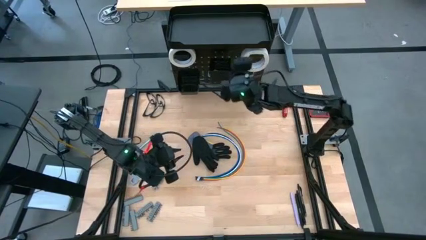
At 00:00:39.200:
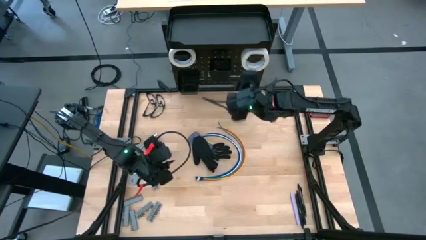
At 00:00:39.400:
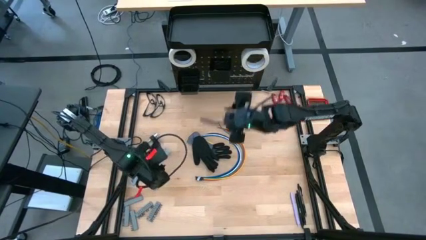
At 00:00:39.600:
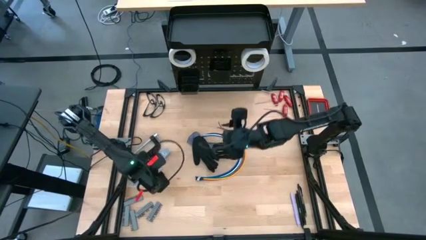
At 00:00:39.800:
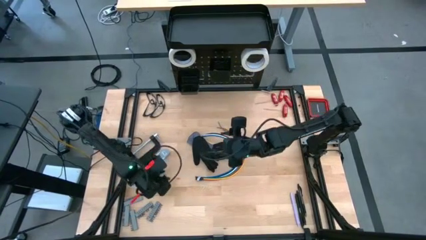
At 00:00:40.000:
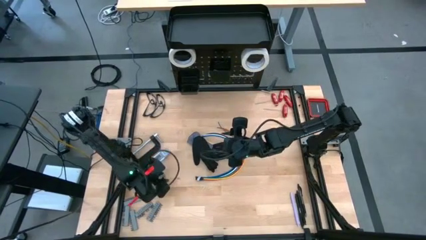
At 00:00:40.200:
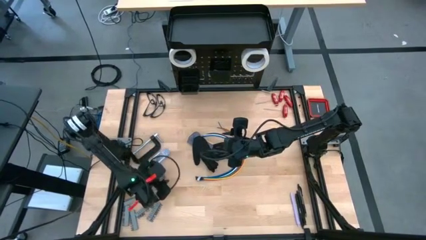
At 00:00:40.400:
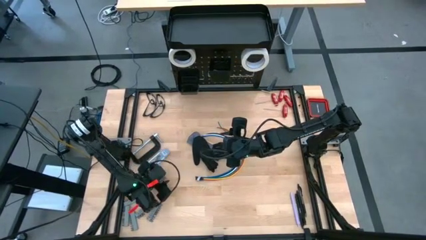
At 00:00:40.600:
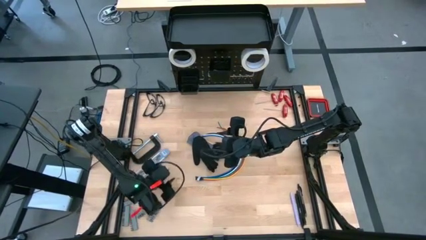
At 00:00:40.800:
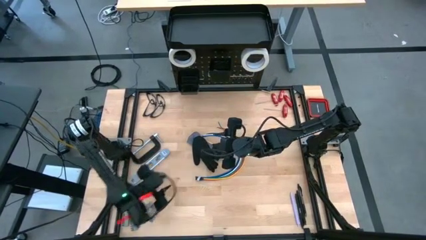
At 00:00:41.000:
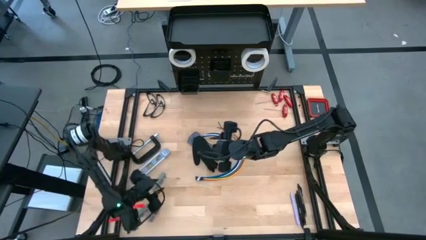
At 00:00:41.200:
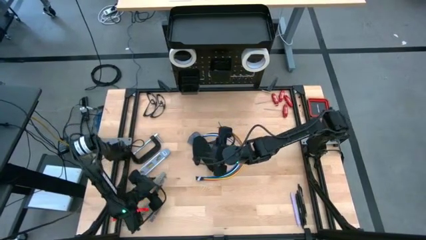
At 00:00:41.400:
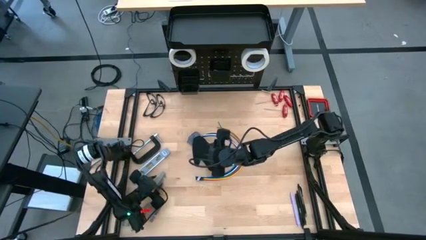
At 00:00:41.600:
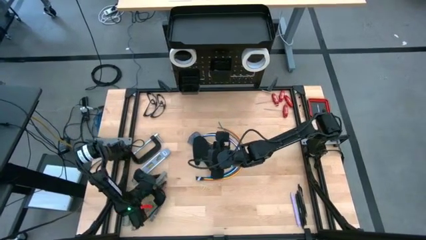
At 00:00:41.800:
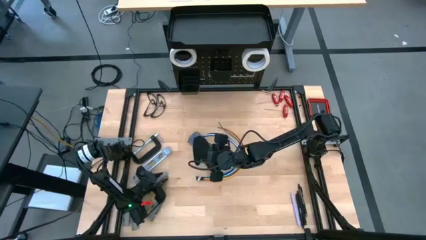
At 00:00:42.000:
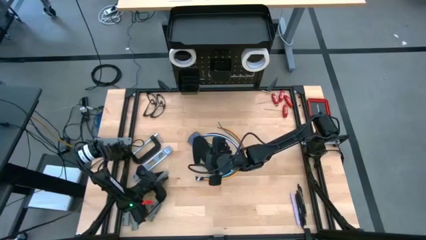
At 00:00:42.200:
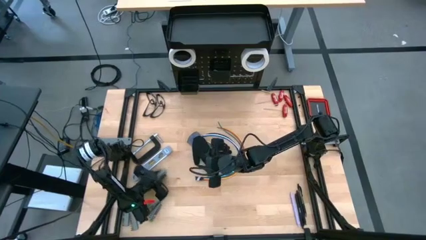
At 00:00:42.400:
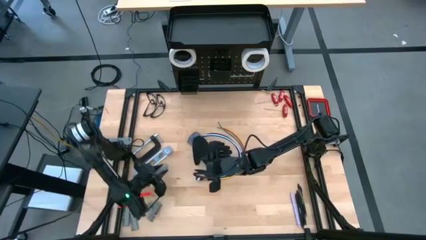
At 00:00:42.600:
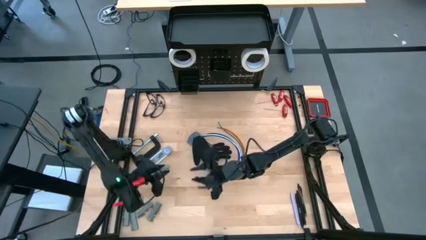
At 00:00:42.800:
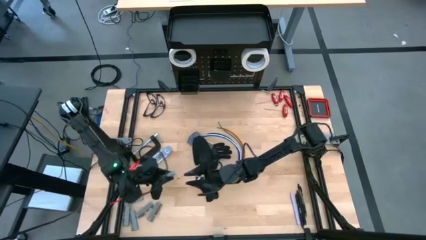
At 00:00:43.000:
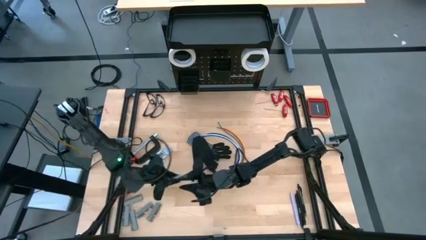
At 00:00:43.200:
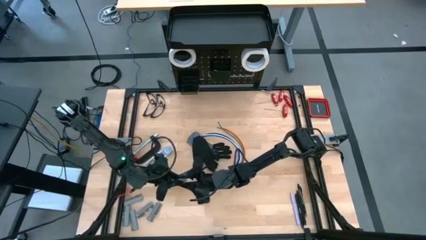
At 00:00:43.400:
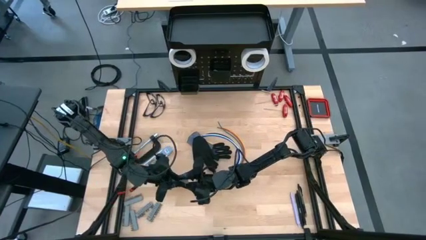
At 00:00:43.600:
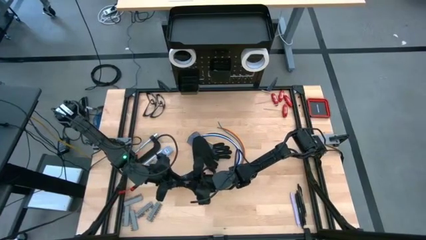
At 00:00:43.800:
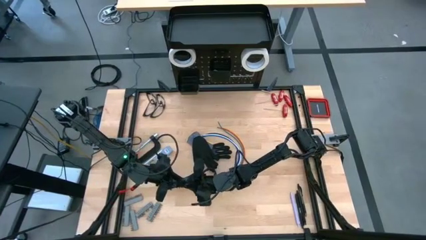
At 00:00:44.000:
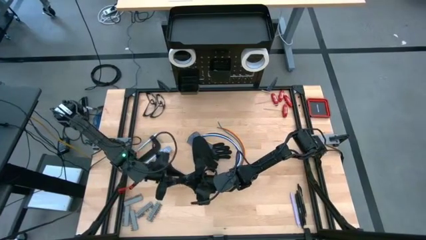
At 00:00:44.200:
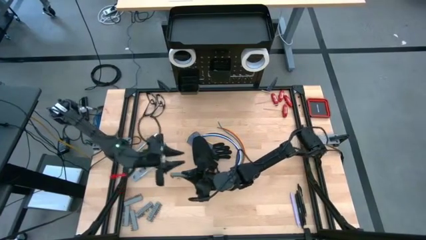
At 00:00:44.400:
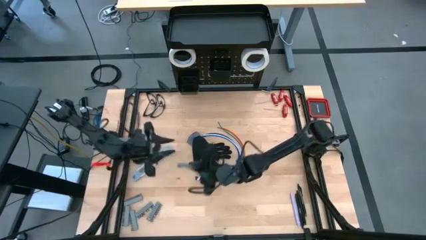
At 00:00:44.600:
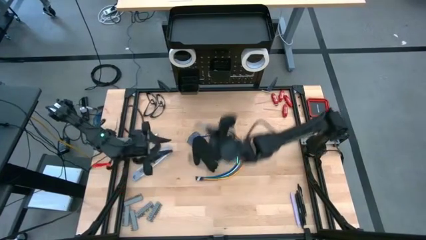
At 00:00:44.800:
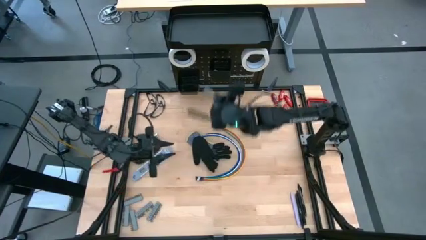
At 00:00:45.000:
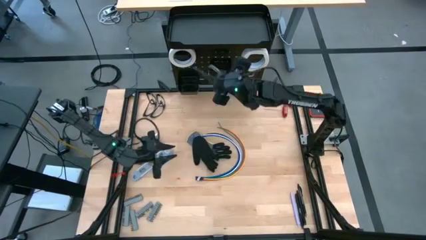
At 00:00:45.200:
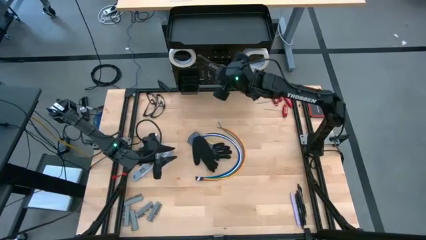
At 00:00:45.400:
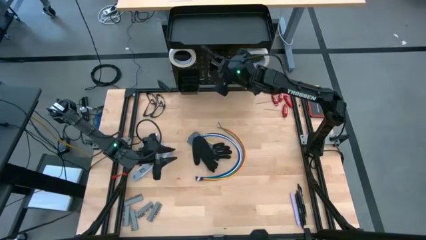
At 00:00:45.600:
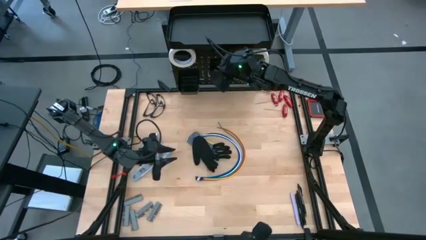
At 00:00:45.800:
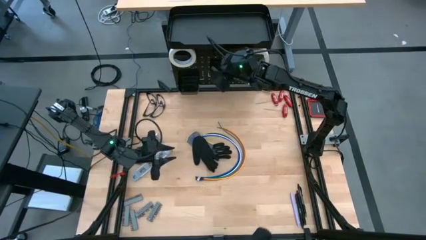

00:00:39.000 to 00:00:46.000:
Task: Hang tools onto peg board
Put the terminal block into the black bin on the peg board

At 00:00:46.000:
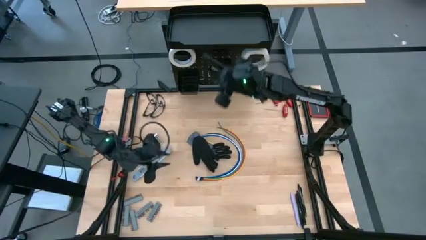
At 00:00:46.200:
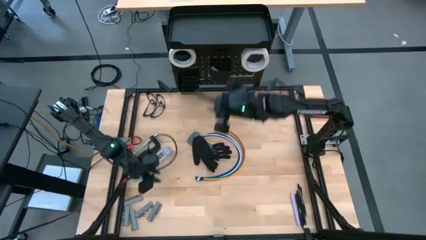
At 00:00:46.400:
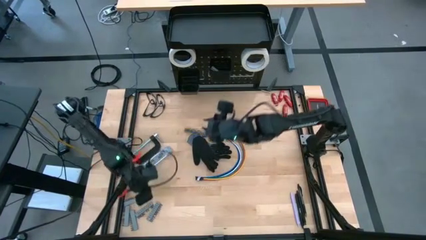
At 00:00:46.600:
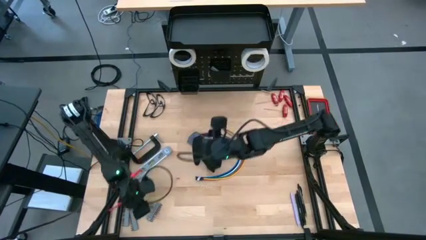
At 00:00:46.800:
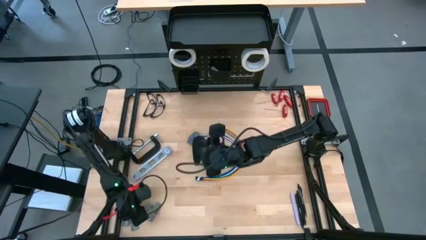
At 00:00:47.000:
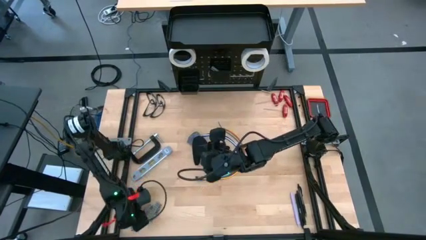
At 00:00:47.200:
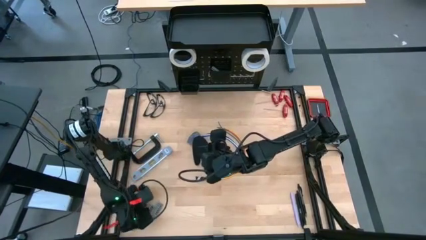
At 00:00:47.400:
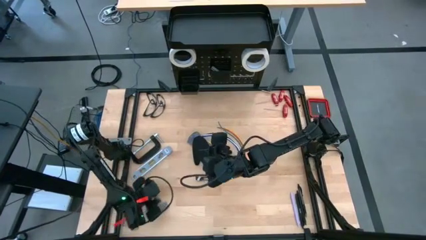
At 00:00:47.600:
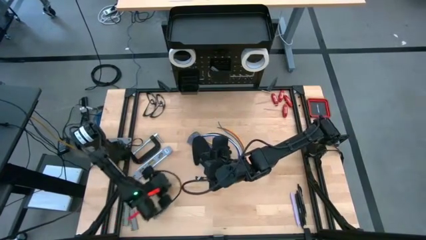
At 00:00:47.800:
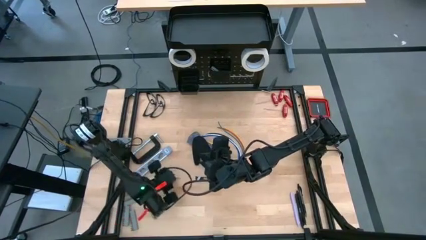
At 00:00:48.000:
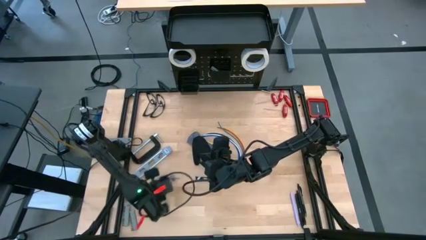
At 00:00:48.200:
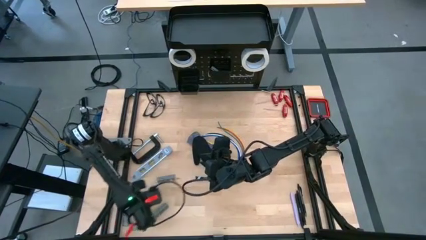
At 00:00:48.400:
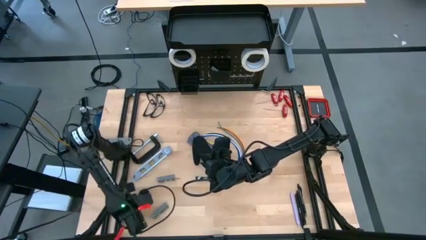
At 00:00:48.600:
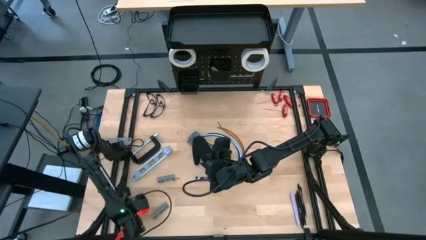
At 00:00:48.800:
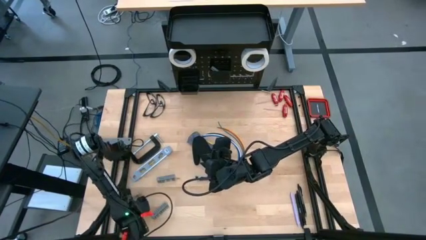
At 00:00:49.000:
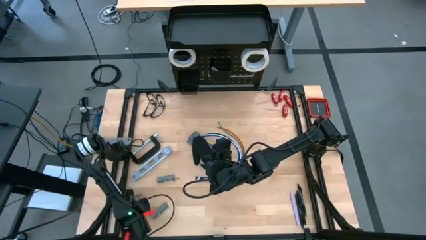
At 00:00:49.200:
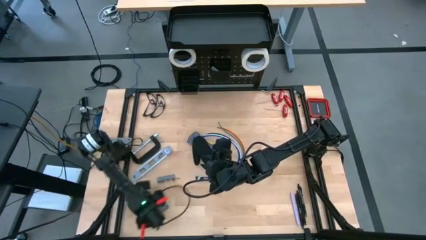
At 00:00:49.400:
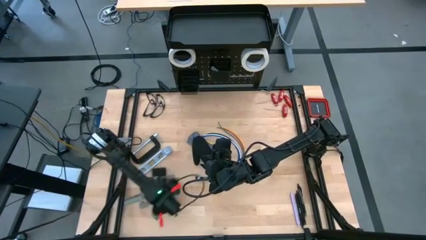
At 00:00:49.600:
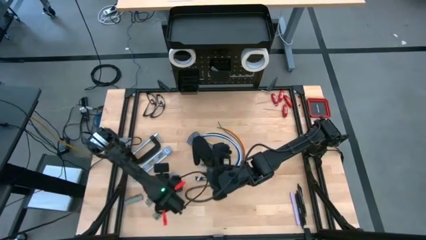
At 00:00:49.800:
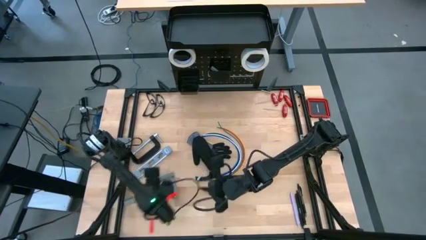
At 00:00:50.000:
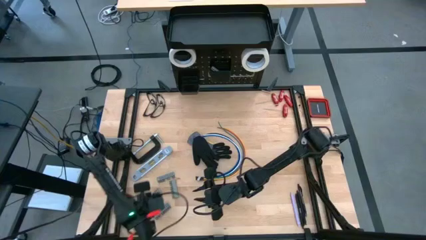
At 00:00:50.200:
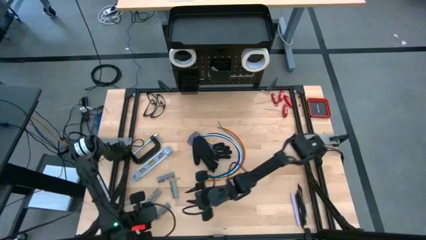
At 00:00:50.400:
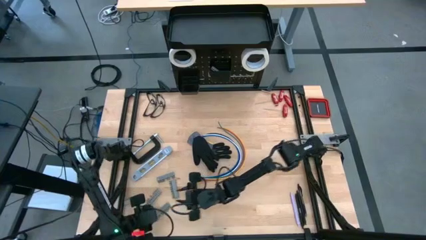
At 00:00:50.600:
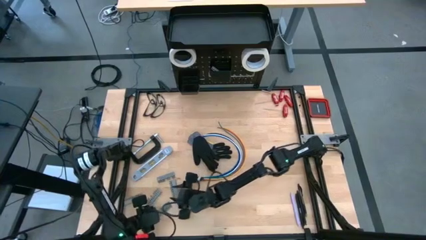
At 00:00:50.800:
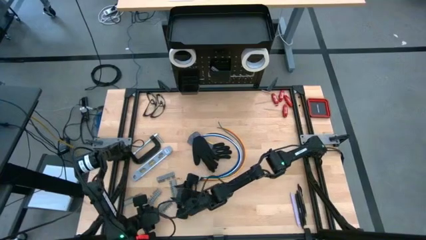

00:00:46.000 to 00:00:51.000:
Adjust the terminal blocks

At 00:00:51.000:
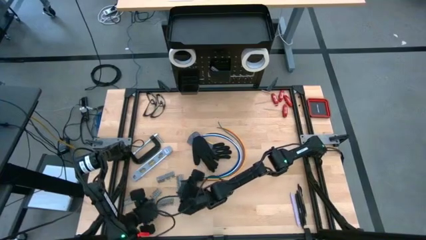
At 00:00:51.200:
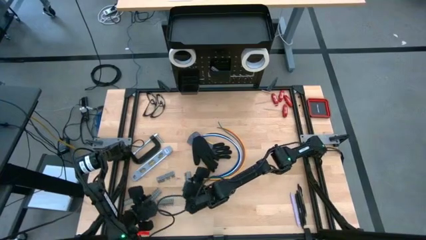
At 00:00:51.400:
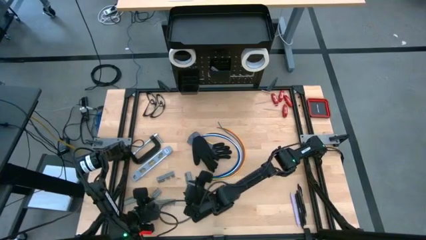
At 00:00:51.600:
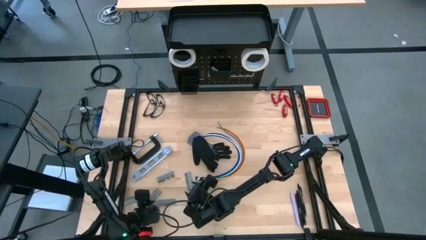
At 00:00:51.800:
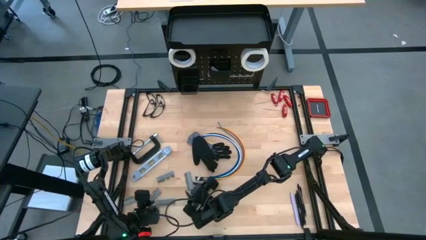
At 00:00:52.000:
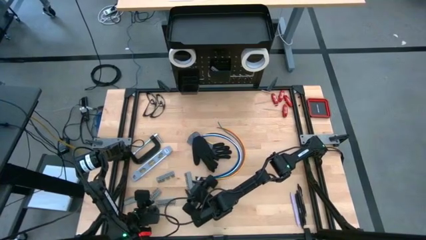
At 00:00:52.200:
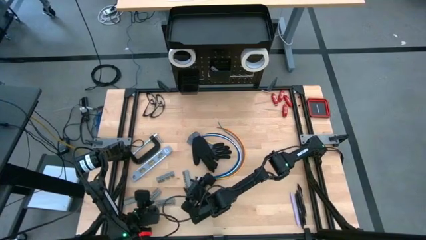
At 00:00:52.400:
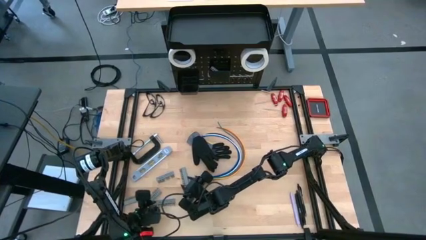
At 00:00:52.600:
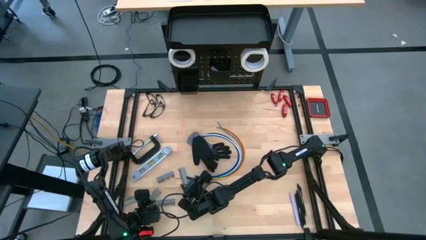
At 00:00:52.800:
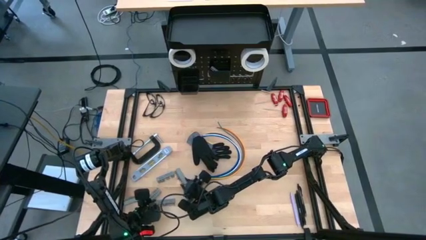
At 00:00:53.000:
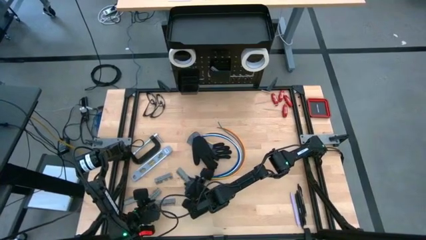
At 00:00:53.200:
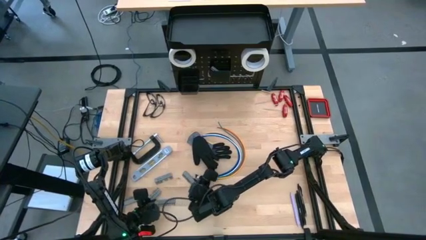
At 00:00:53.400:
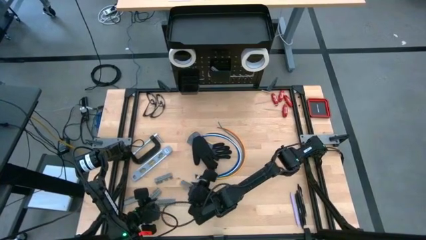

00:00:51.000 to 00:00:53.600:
Put the terminal block into the black bin on the peg board

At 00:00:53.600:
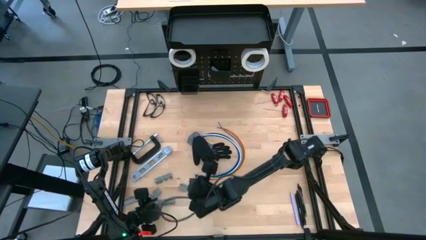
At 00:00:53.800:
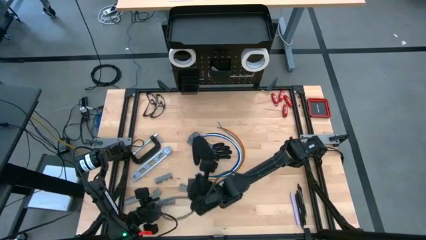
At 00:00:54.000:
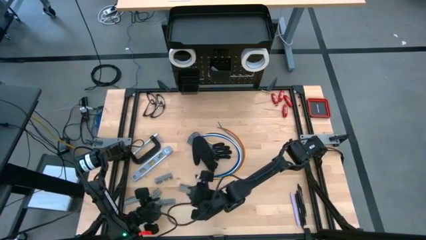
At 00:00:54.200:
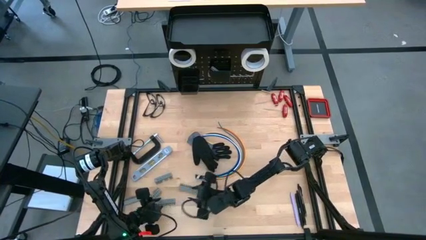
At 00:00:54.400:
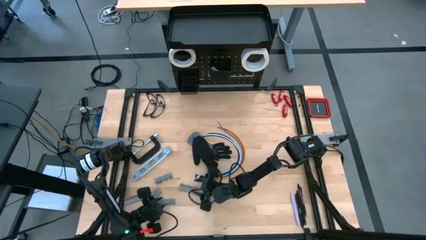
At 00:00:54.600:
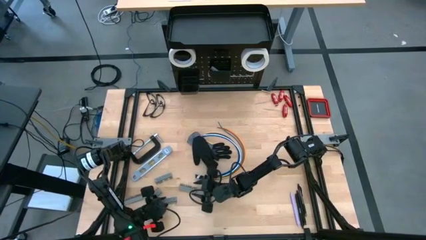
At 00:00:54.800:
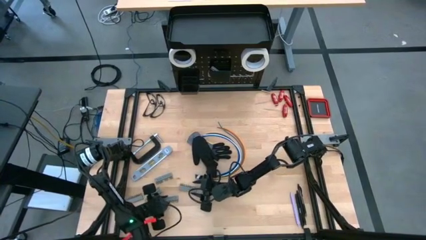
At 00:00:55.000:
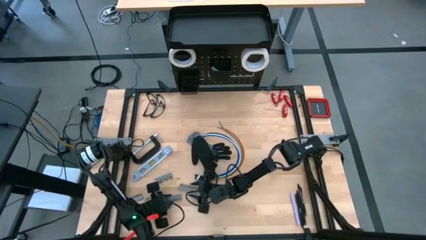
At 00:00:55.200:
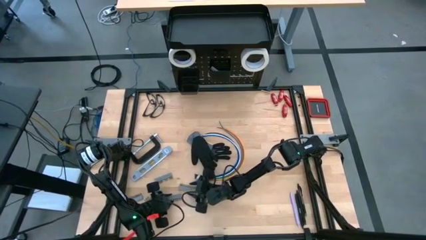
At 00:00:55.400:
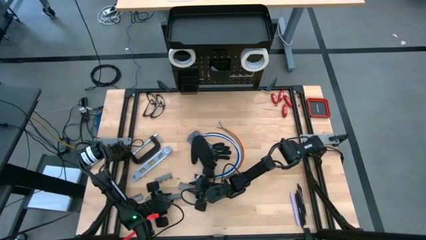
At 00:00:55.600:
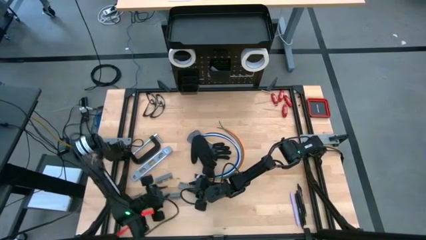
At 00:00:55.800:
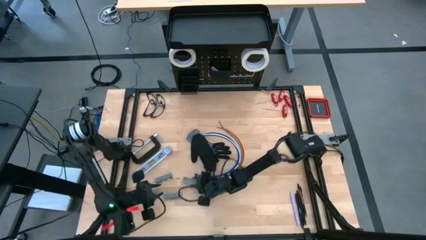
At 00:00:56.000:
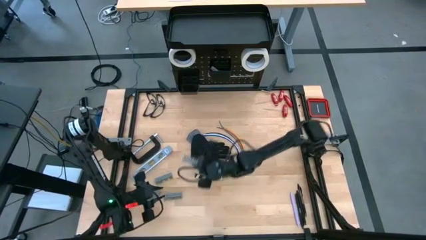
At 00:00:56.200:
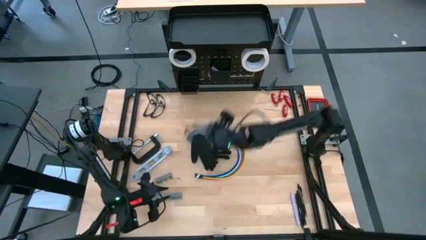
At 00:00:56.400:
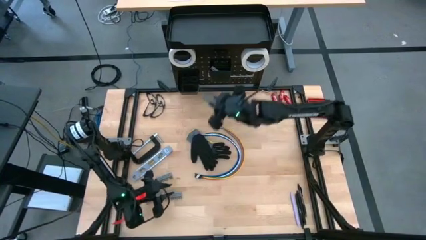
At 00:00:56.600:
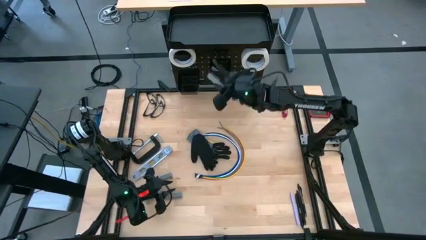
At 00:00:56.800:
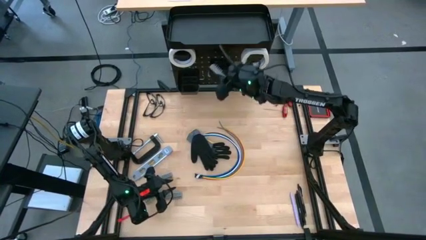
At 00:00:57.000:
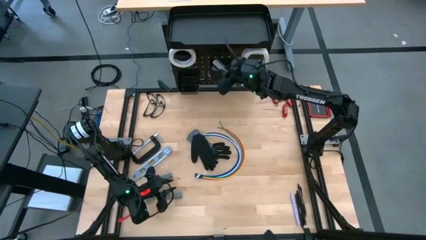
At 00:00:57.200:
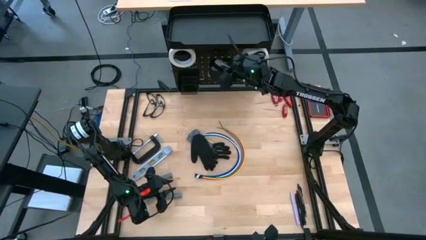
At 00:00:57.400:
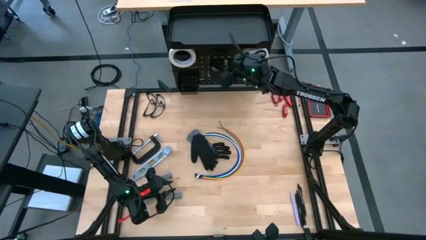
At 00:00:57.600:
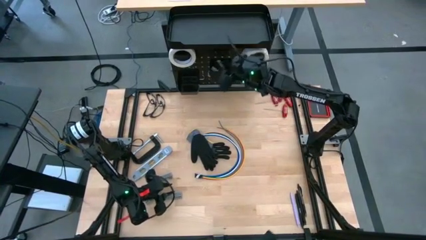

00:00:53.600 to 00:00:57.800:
Put the terminal block into the black bin on the peg board
